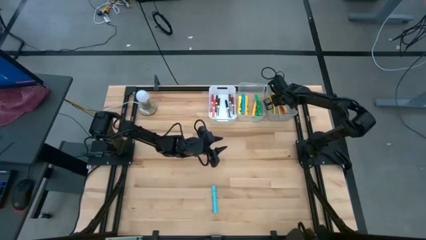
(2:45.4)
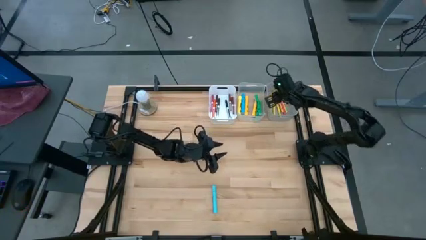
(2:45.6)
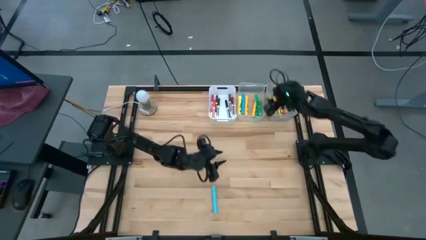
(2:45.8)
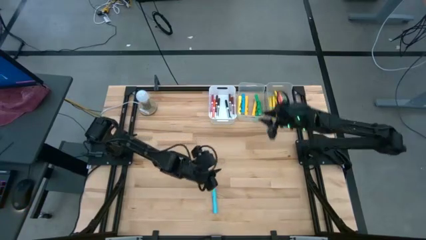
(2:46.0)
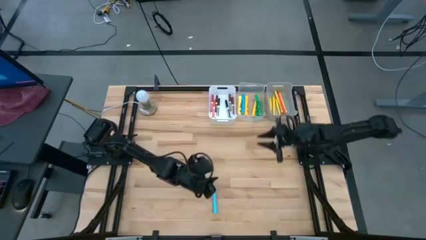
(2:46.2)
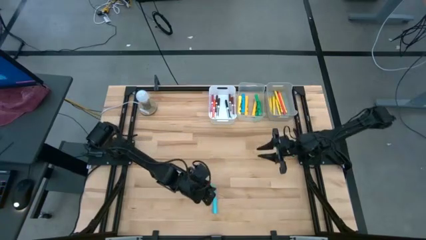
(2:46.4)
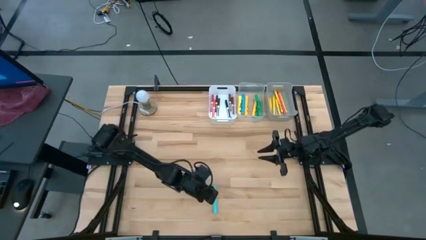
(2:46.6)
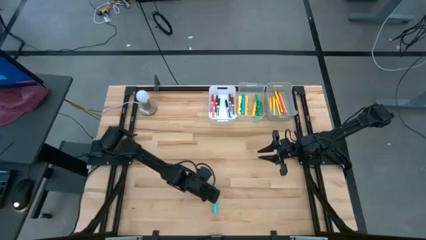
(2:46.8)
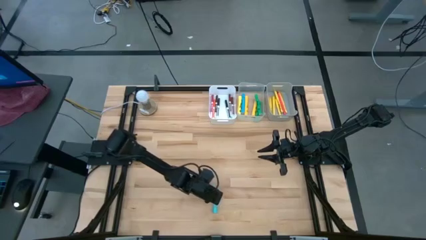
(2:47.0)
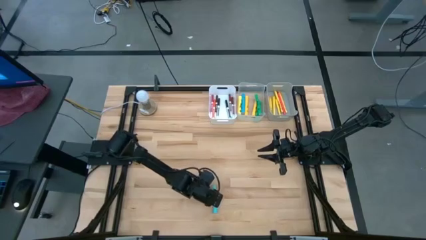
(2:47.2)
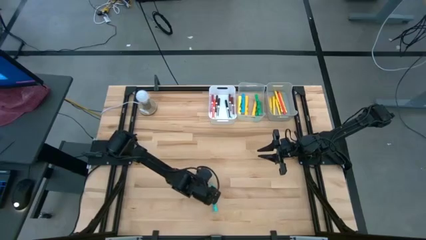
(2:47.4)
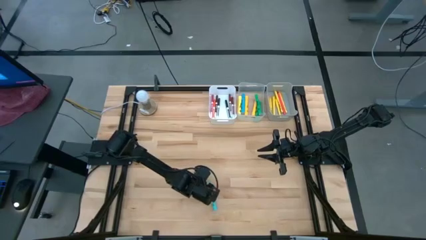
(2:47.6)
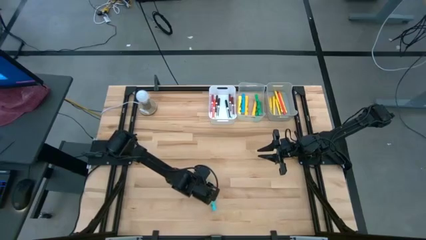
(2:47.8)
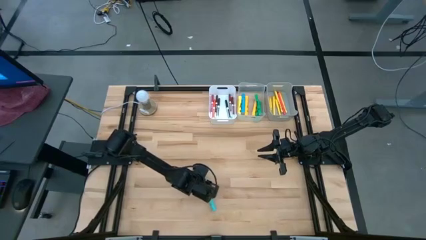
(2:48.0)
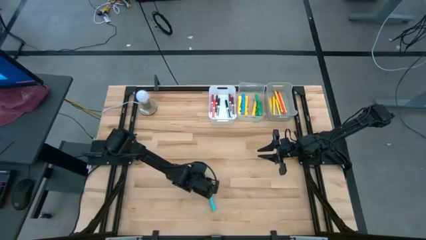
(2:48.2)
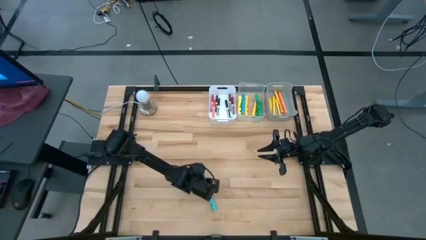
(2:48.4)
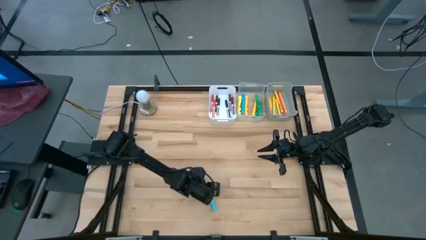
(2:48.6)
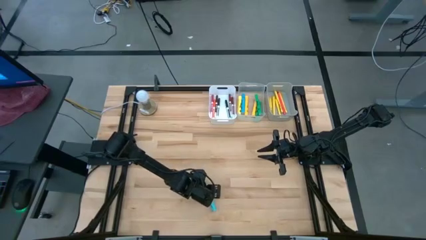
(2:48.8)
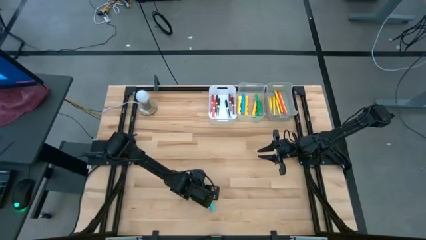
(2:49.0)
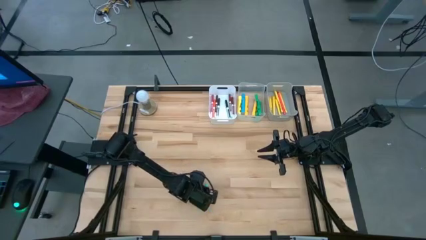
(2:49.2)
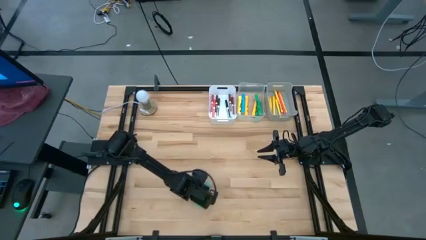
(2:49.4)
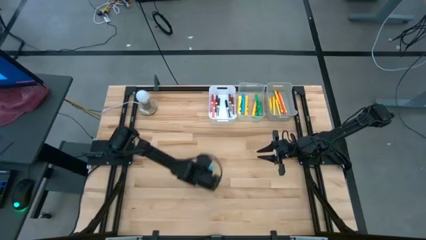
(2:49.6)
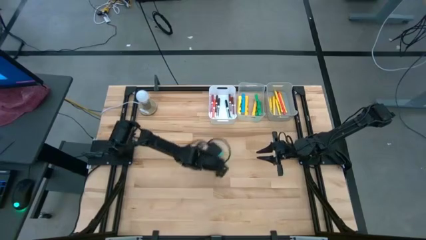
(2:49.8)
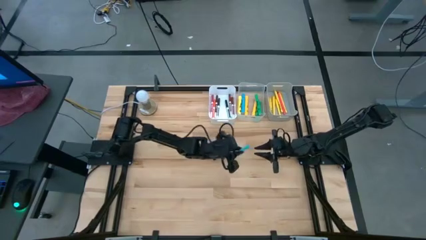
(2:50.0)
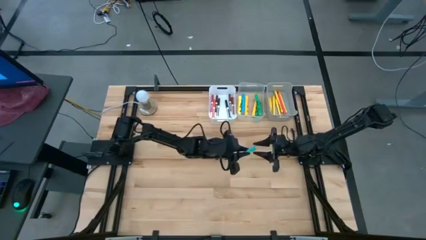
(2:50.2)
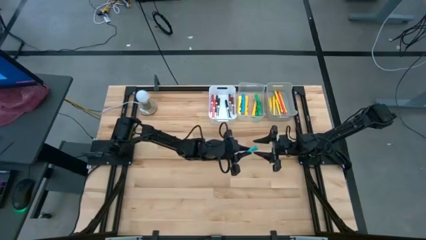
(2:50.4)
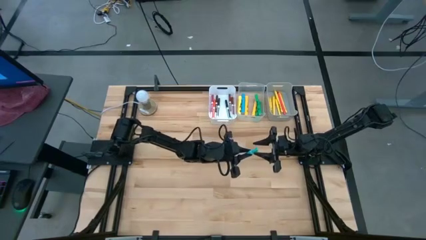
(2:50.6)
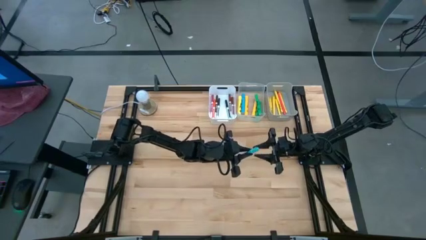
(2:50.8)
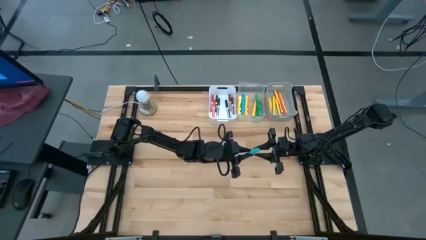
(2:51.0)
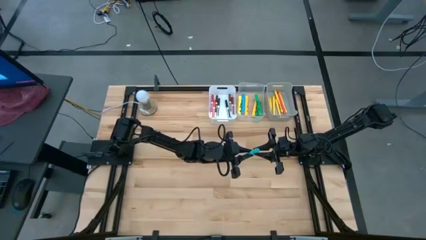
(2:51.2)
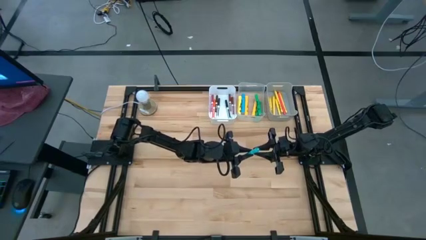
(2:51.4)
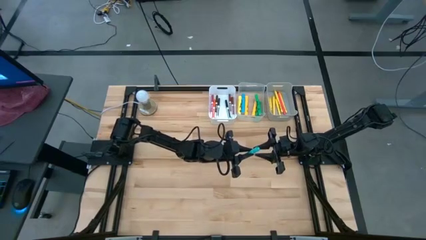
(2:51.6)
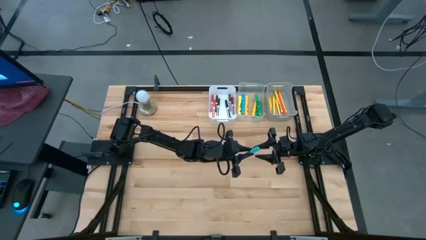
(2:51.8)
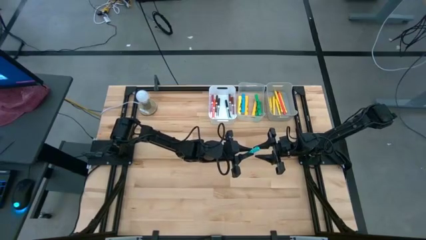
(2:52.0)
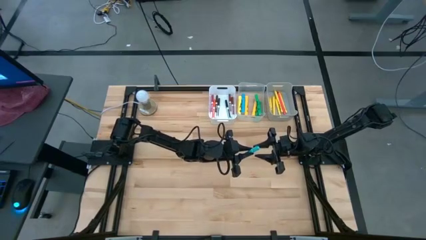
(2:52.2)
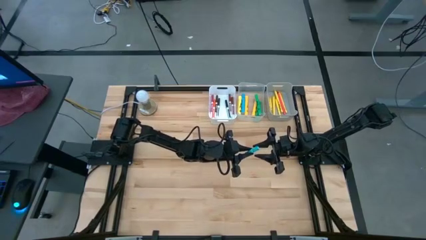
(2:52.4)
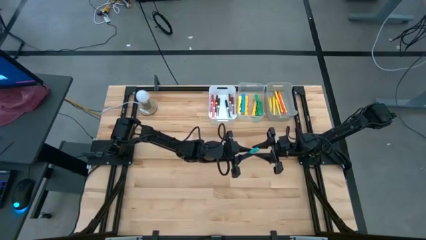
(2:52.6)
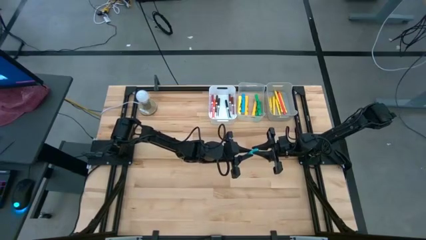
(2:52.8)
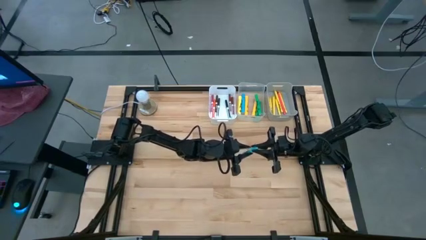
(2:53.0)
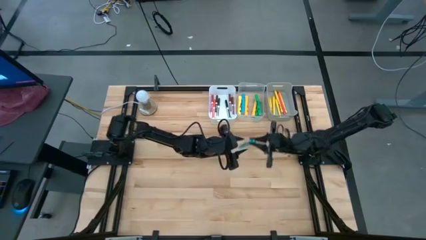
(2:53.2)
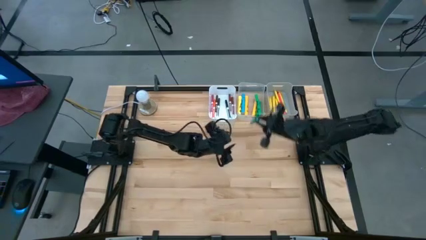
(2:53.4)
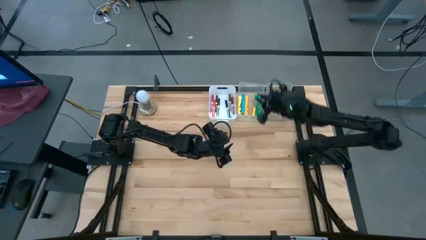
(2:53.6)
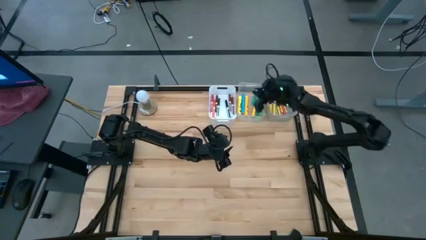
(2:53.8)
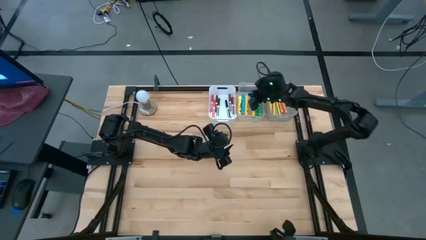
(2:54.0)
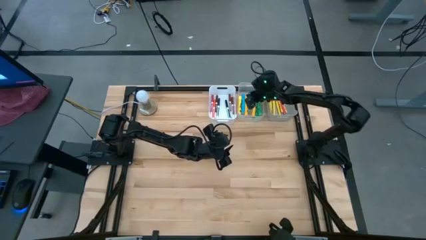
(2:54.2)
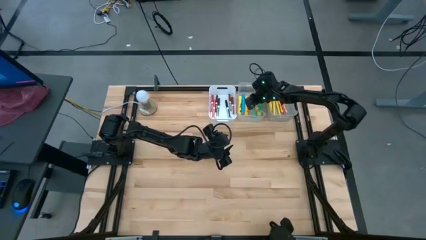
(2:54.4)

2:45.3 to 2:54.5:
Task: Pick & Place Markers
Put the light blue highlighter pen into the transparent bin

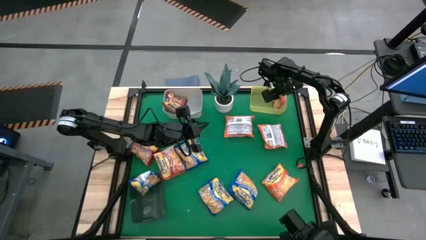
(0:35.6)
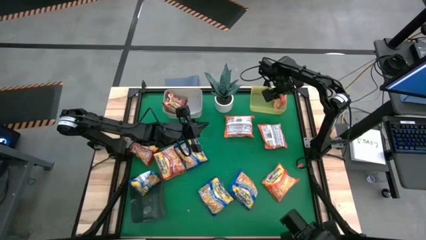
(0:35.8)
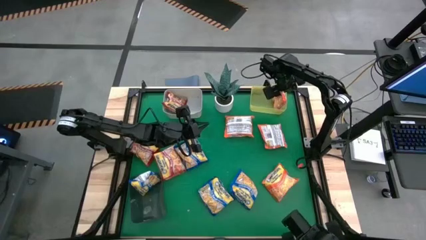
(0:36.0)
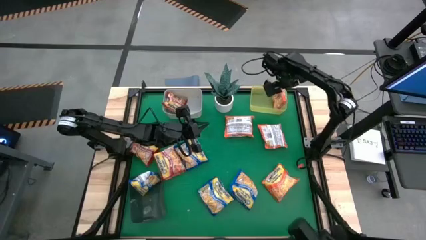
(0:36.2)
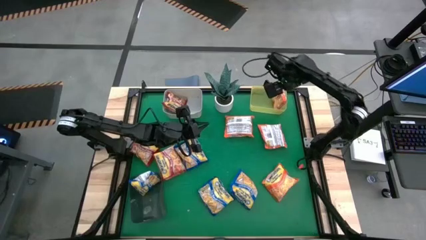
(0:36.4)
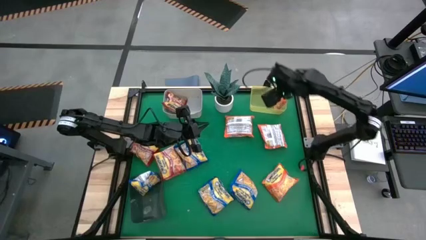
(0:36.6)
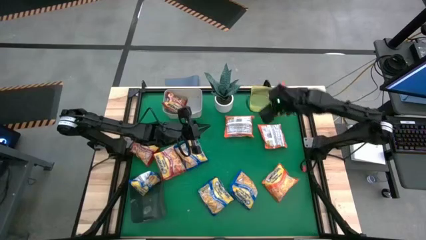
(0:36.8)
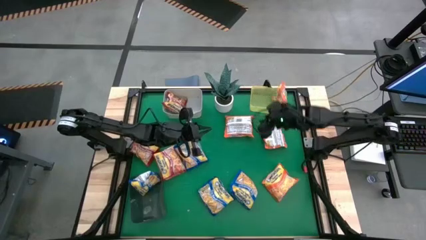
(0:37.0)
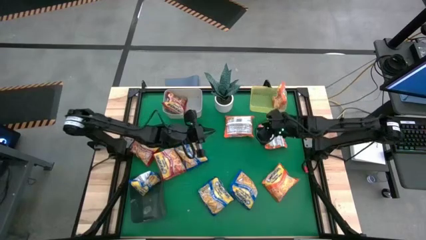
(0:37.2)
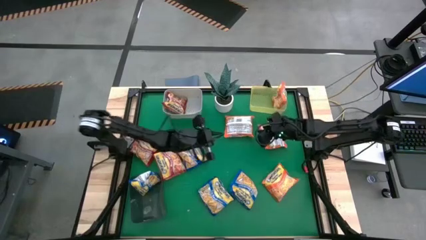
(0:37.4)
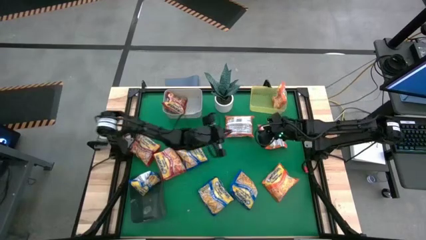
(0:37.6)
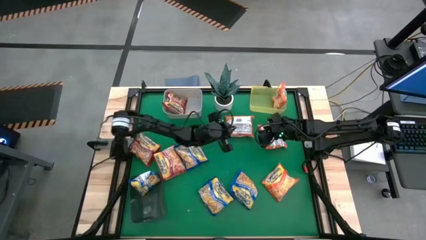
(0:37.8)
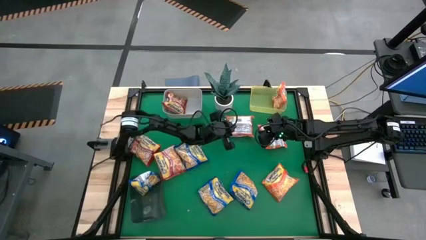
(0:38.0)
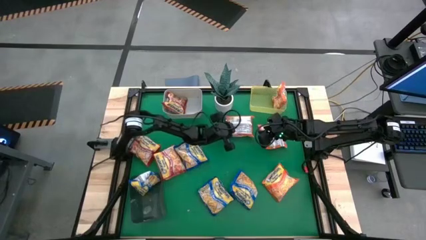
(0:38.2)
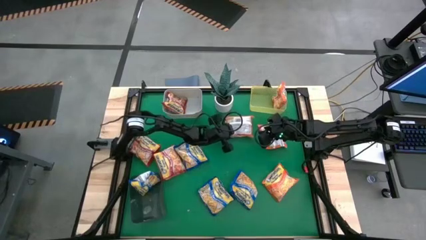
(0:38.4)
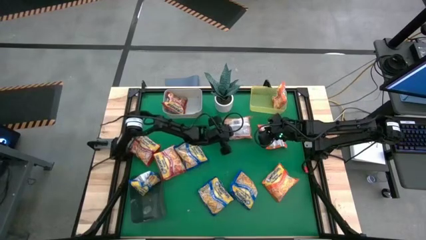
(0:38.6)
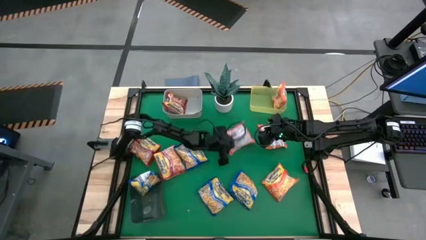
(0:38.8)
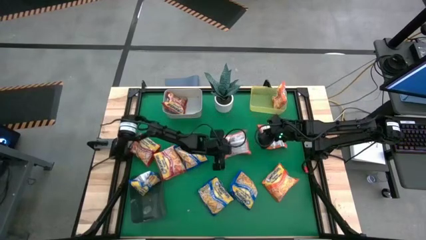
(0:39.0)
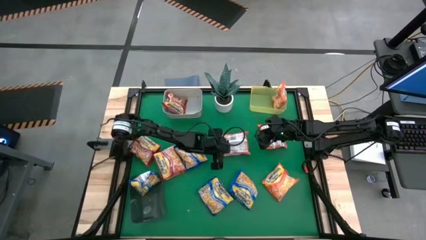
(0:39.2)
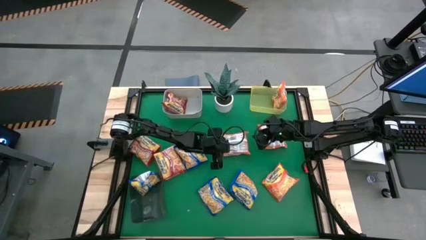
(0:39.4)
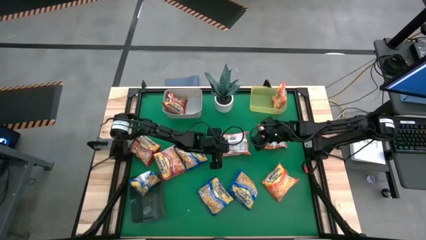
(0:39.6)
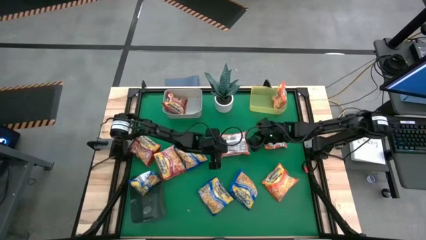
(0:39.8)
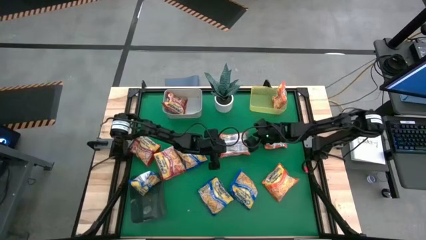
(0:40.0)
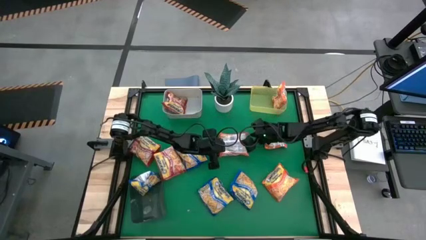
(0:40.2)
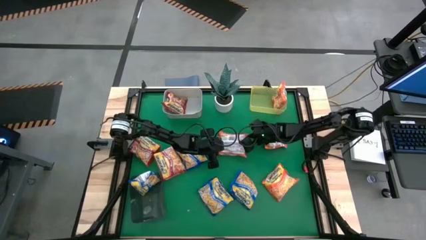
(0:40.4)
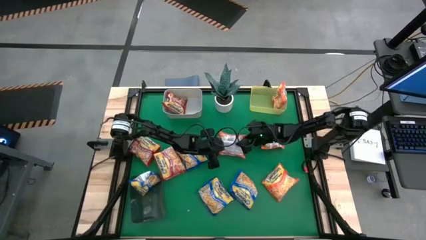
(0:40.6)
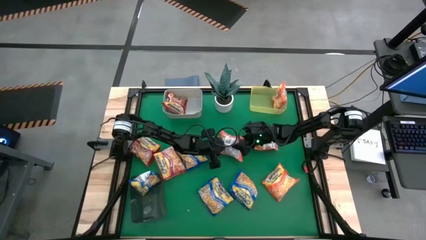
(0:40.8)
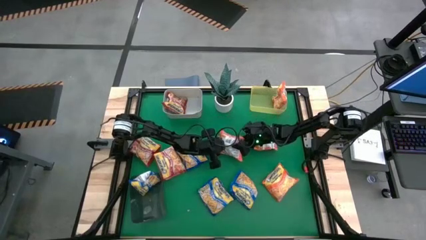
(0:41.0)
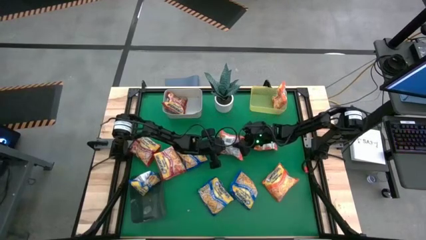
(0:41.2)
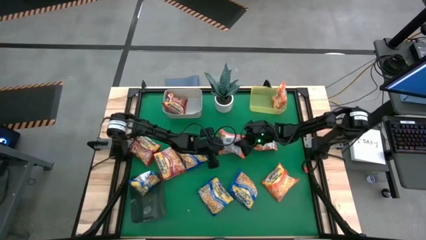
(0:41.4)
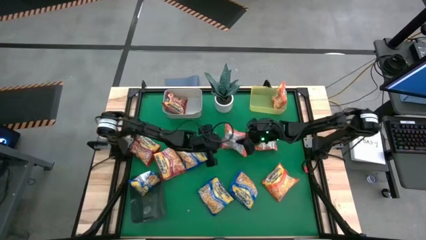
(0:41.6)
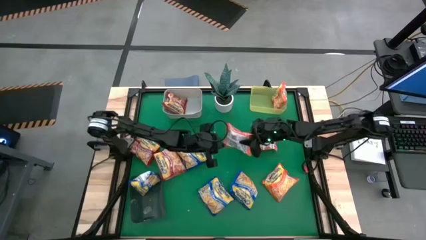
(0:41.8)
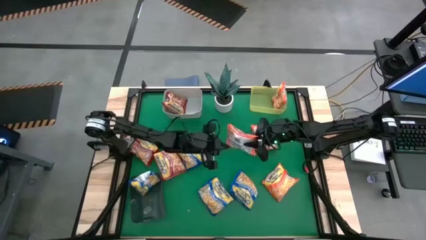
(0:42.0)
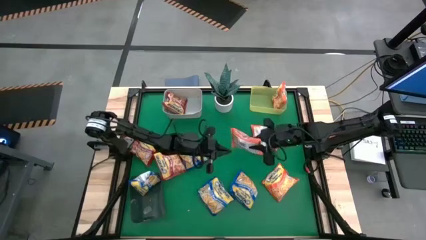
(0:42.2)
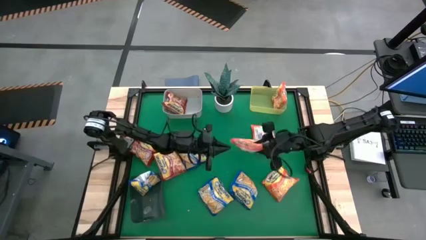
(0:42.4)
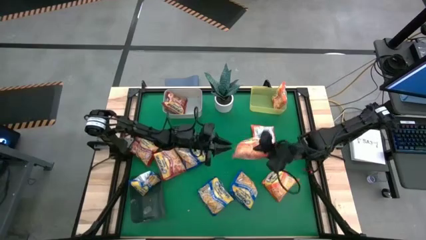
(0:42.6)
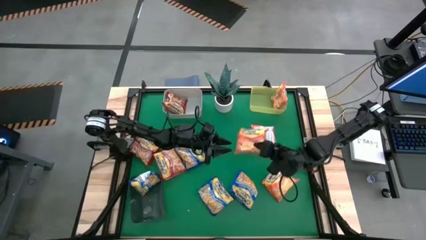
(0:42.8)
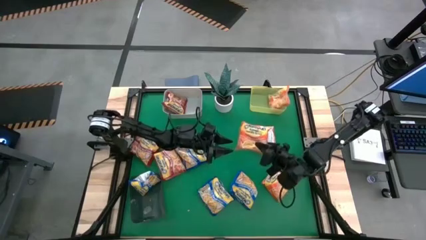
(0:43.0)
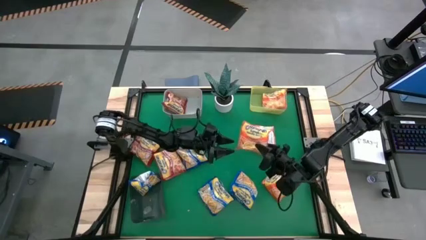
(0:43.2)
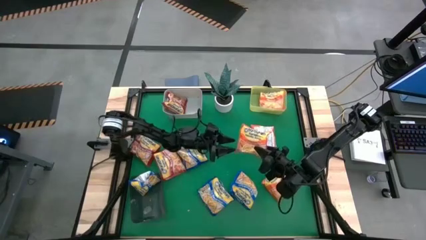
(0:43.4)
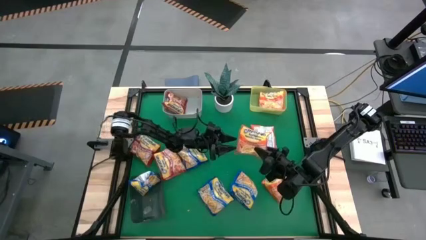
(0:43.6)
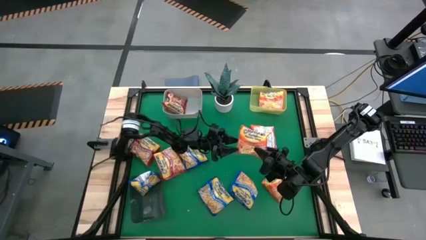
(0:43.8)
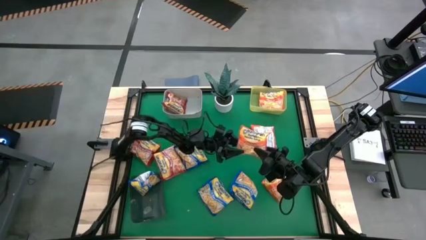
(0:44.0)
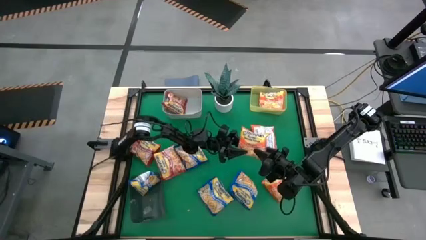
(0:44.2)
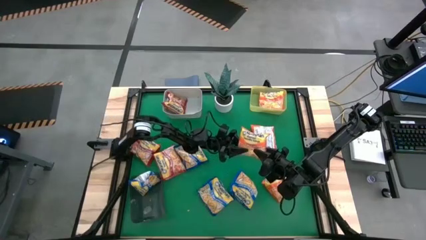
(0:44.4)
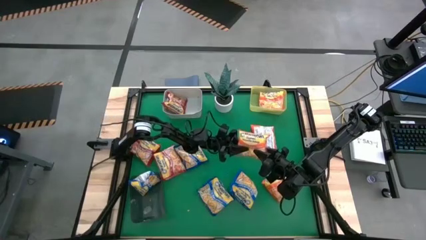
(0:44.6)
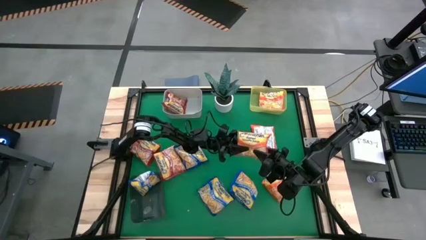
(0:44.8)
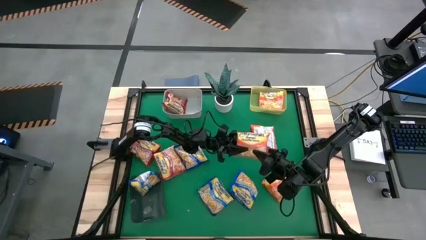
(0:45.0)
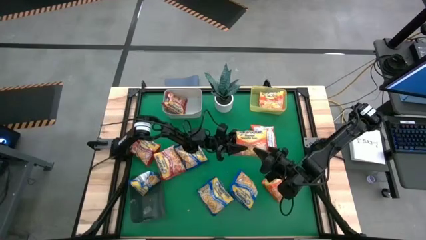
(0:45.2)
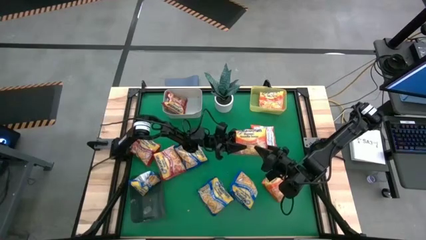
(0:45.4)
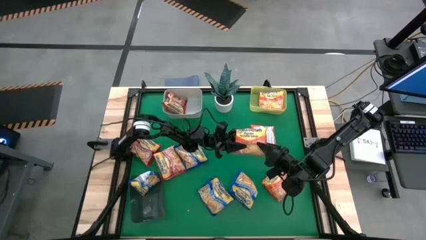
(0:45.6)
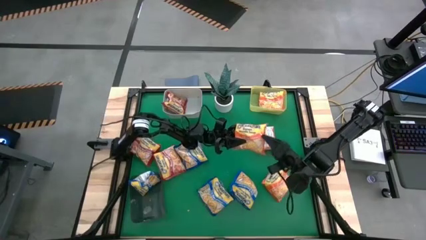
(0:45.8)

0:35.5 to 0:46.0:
Task: Sort Maruchan noodles
Put the top center orange noodle pack into the yellow bin
